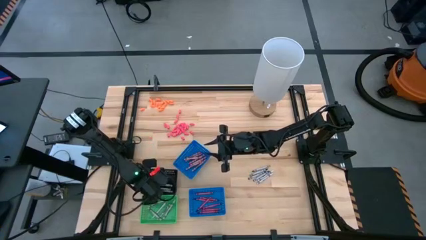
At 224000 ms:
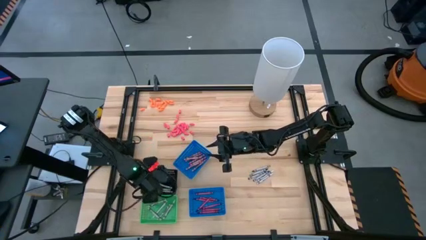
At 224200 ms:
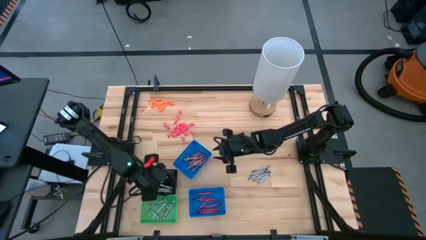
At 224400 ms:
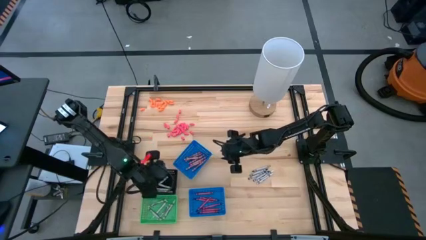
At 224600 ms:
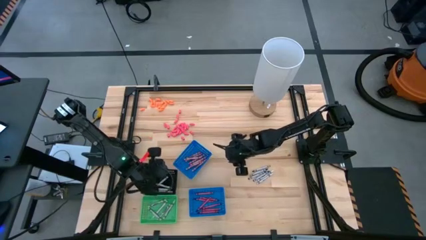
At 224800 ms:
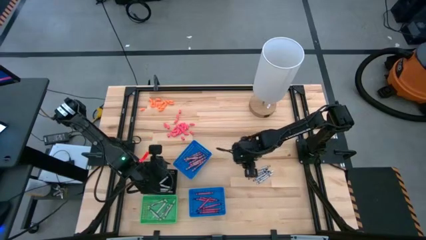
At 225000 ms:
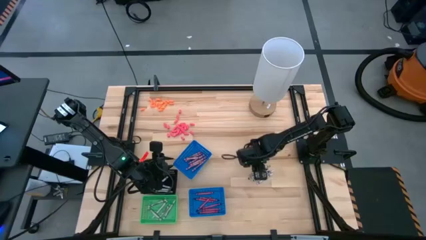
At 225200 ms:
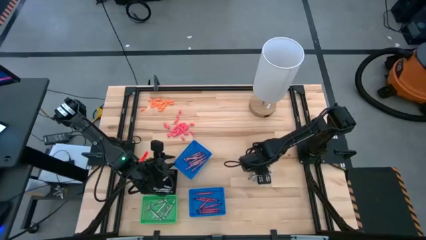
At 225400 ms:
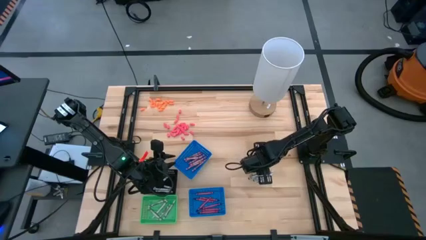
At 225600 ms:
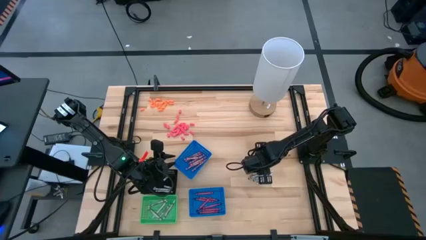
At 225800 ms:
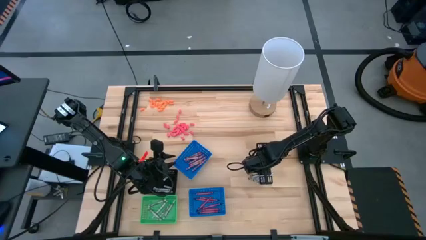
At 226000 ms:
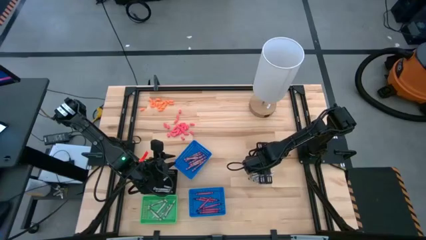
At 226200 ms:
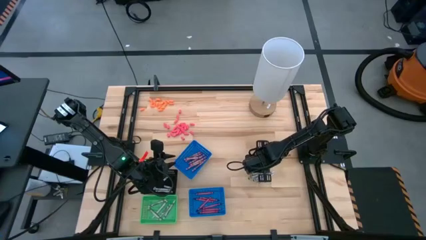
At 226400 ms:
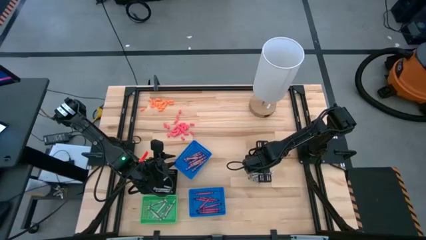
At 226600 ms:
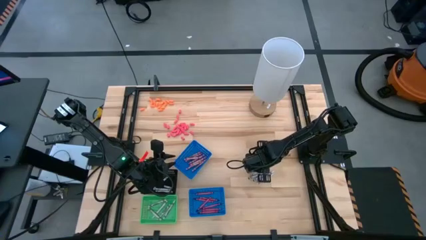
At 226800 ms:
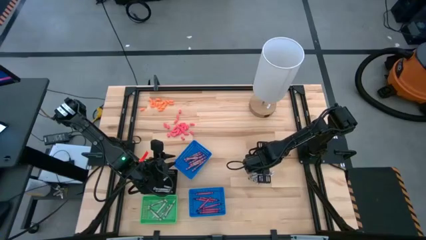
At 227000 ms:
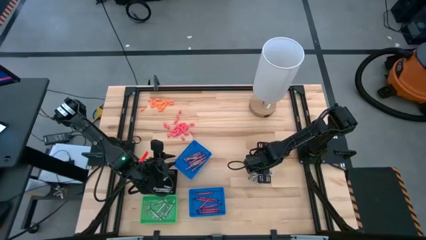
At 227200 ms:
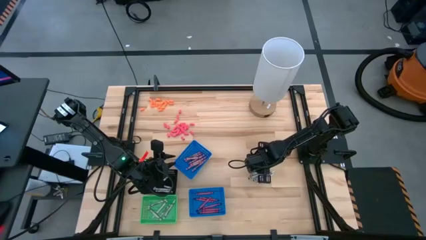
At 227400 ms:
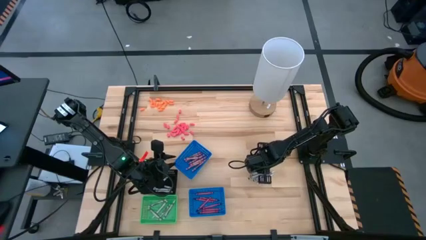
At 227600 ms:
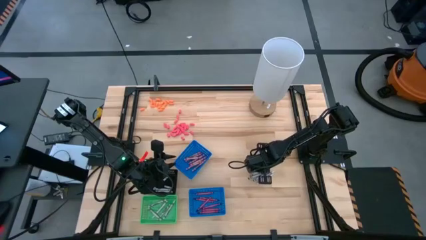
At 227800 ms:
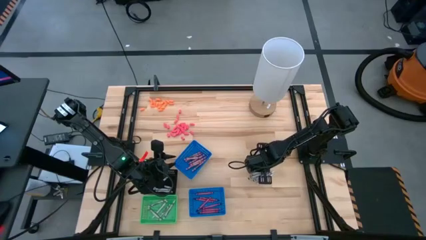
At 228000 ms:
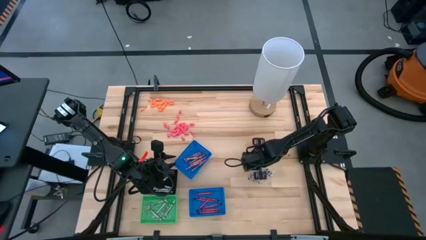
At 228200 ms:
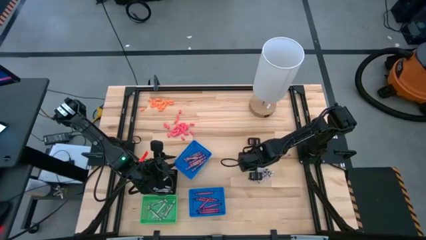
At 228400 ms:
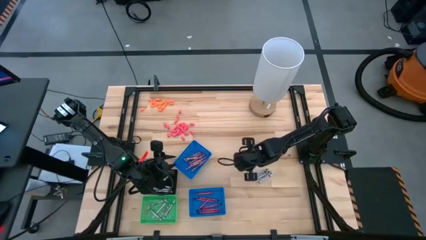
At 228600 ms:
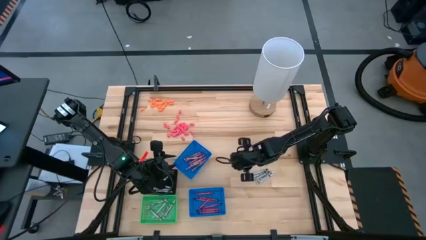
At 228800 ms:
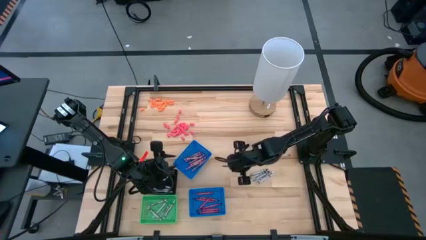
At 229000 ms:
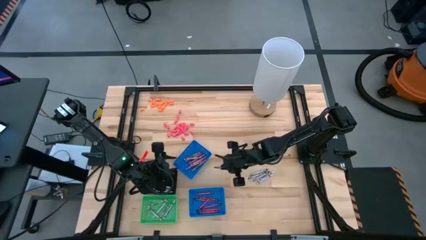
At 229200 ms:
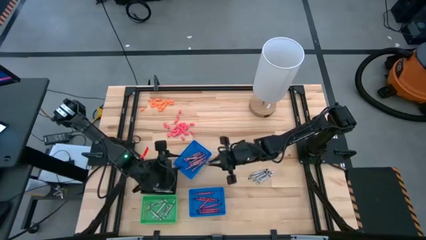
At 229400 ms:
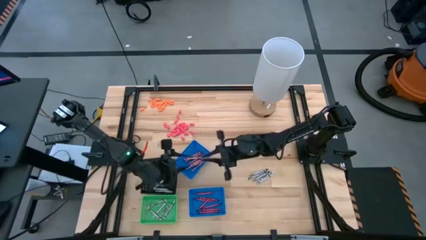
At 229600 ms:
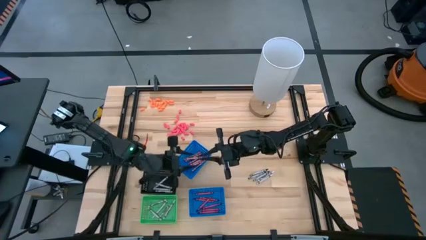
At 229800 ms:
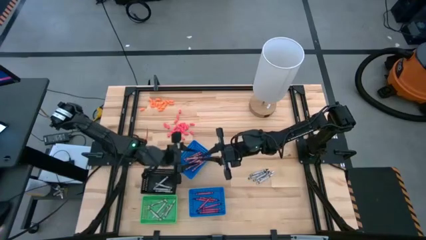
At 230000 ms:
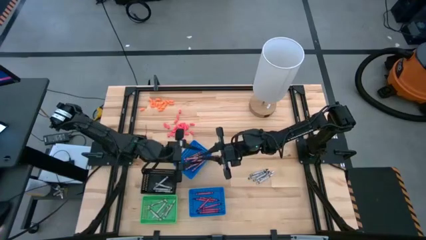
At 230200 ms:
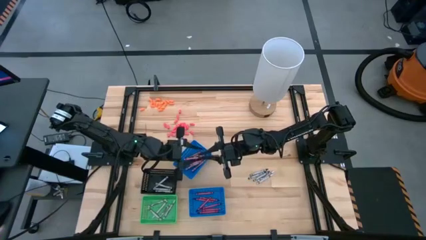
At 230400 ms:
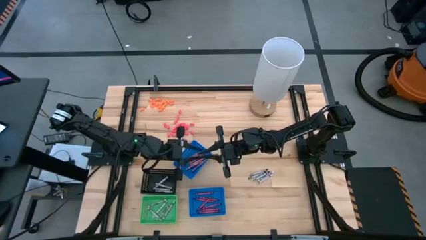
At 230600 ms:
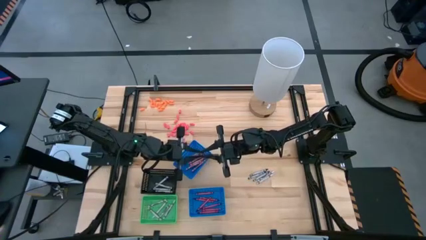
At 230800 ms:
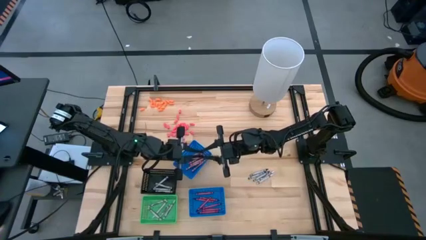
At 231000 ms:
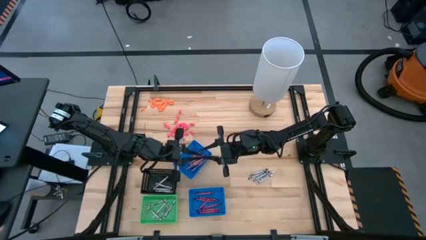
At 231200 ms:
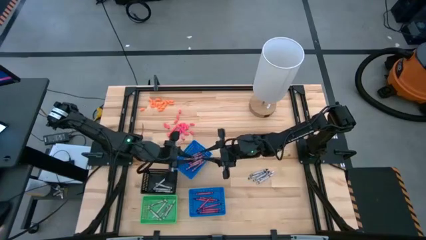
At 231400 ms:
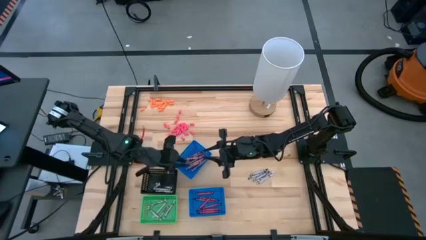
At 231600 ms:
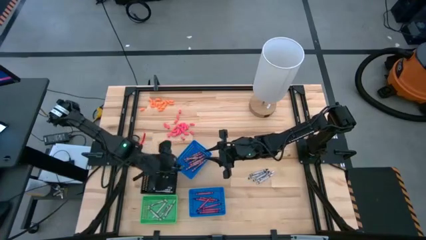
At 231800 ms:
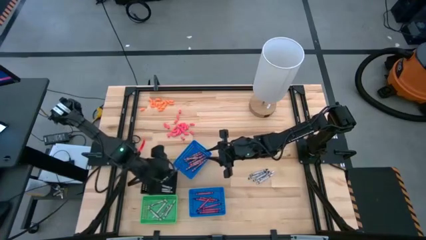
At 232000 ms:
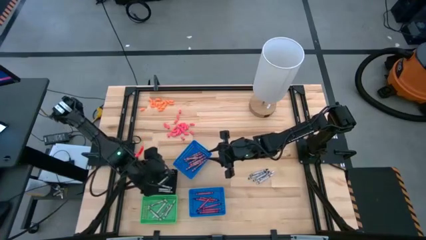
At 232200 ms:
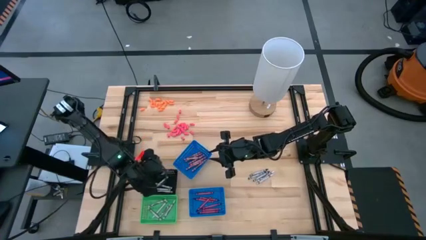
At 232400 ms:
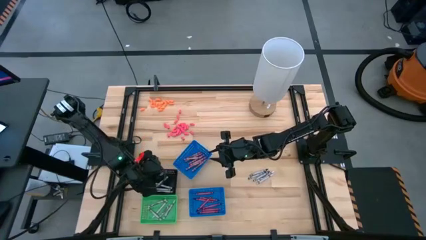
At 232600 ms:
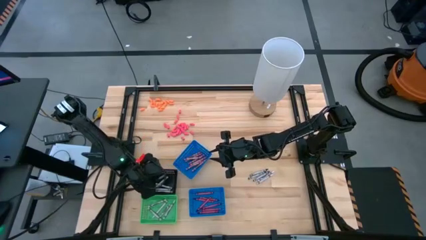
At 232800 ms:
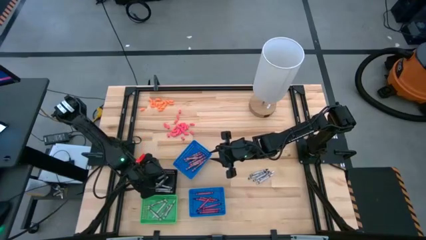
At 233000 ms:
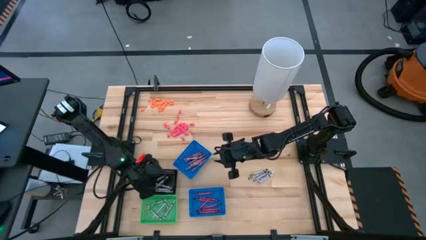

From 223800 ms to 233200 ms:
Task: Sort crayons
Put the black crayon into the black bin

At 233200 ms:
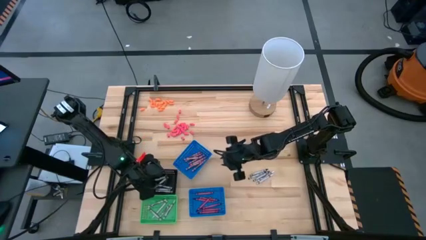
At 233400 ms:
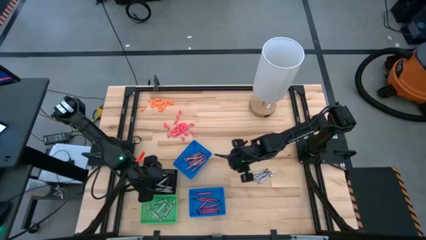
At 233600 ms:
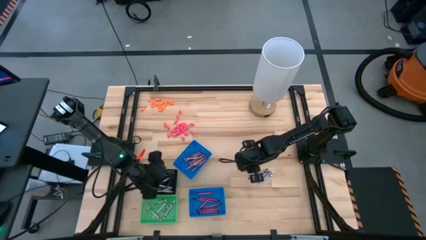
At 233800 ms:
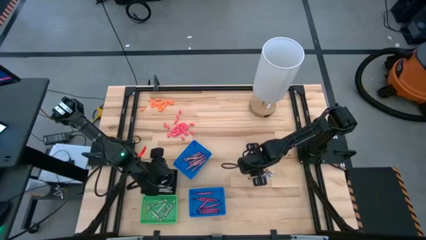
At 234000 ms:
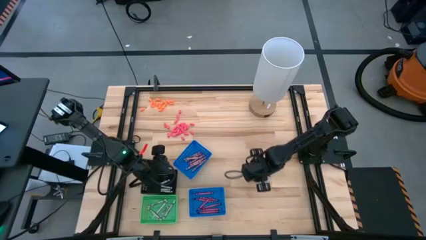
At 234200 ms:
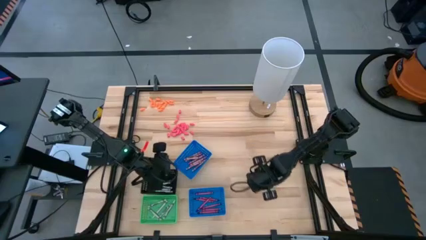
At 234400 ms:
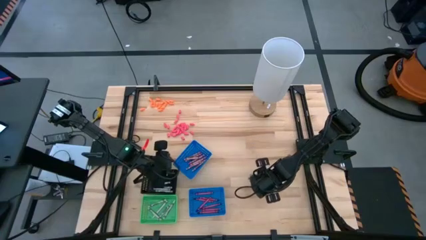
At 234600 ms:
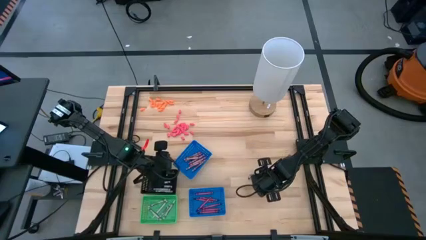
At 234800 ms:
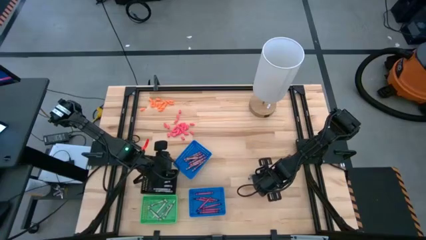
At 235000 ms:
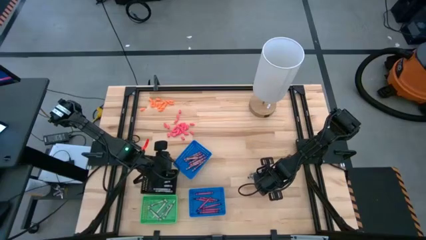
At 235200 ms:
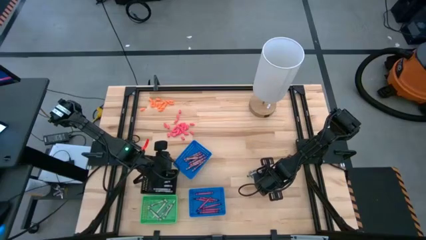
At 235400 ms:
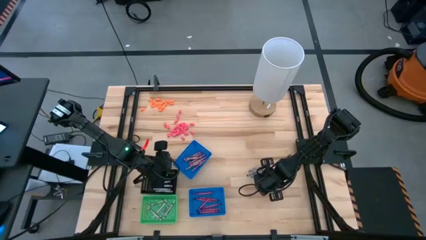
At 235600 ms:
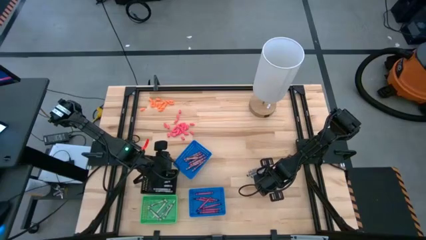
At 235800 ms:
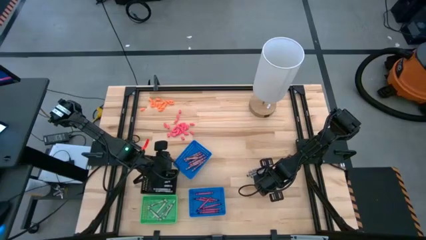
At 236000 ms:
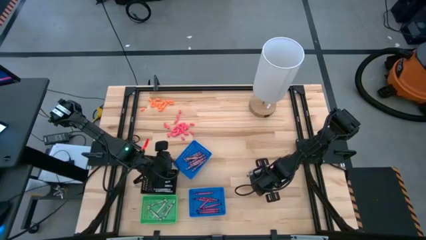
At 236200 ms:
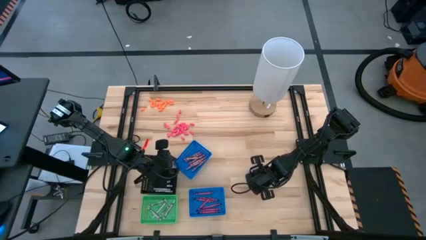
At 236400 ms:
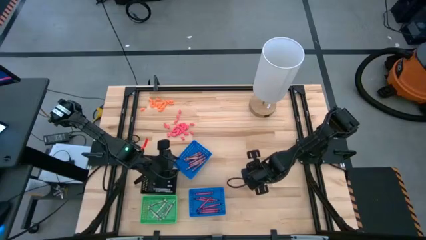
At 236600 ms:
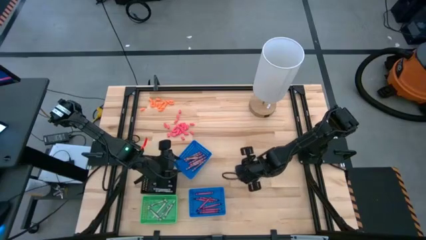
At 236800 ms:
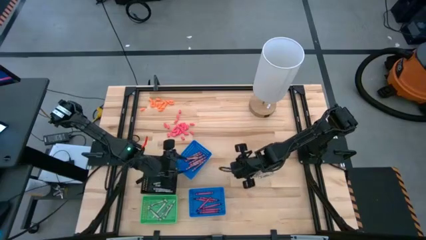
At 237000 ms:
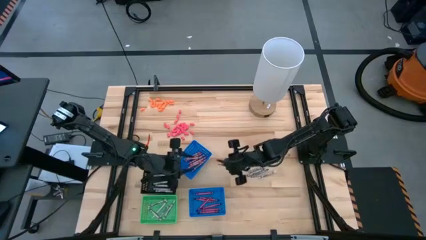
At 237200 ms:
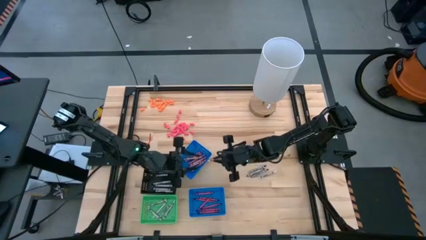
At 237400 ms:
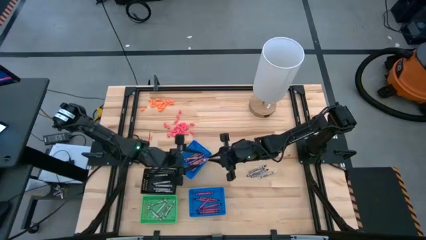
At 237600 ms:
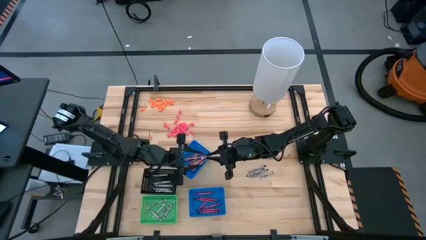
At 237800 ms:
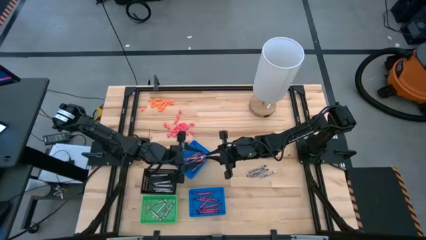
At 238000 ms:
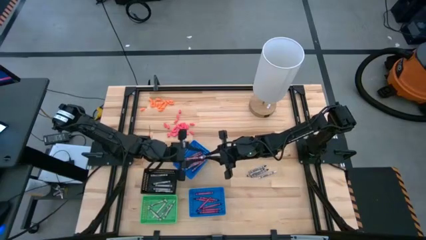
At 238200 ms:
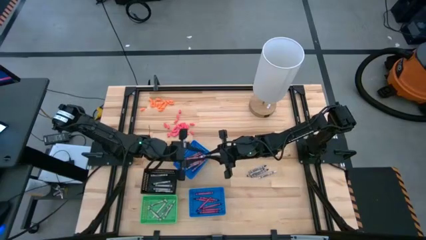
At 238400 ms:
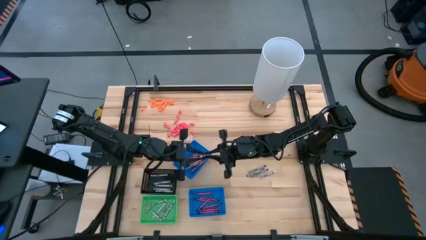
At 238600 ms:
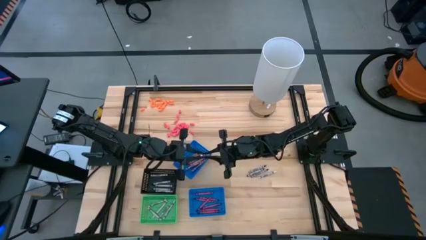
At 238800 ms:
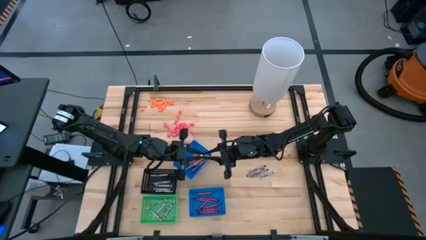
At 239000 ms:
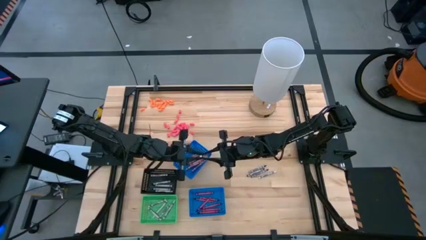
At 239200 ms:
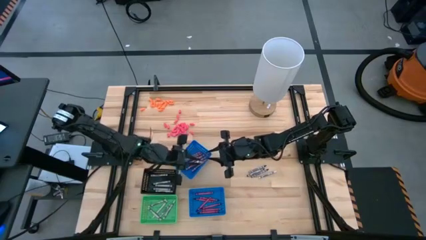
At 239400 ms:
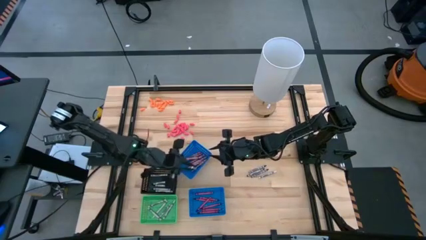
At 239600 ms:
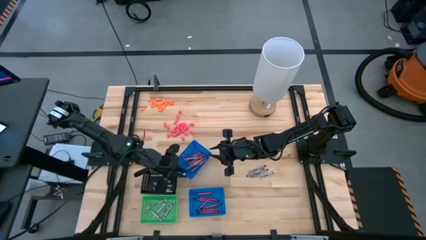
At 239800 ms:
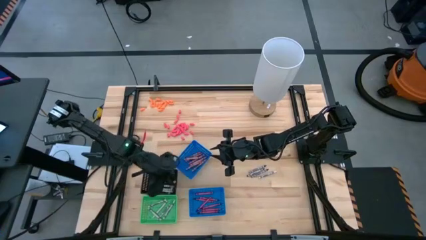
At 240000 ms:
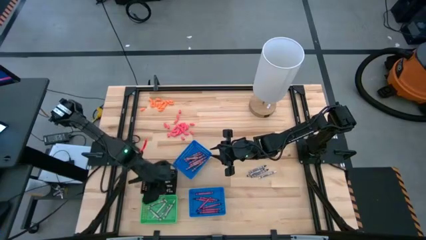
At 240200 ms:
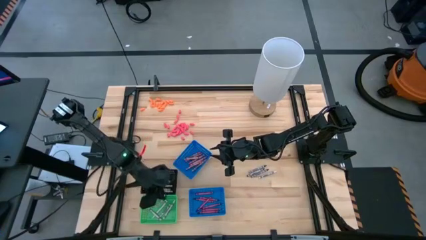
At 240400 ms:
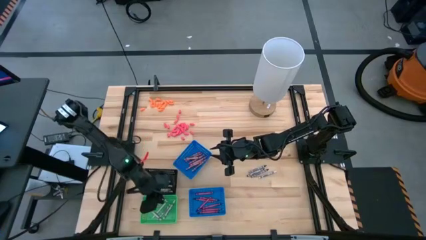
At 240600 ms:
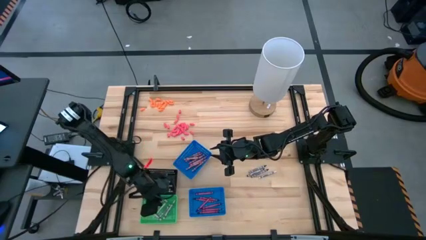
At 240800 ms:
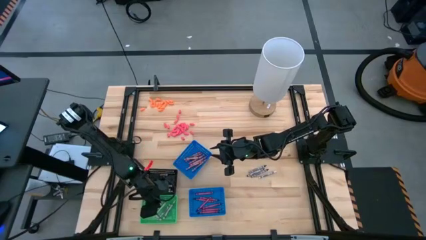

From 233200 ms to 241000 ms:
Put the white crayon into the green bin
